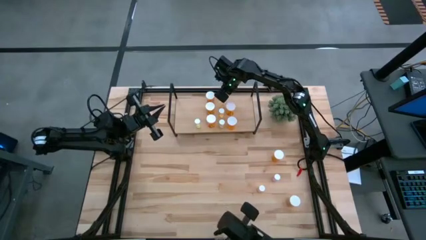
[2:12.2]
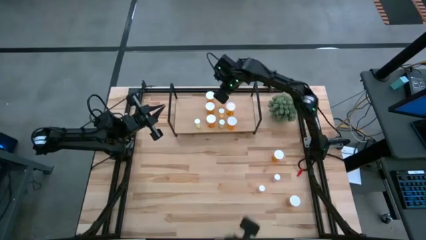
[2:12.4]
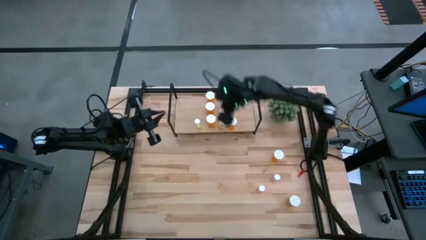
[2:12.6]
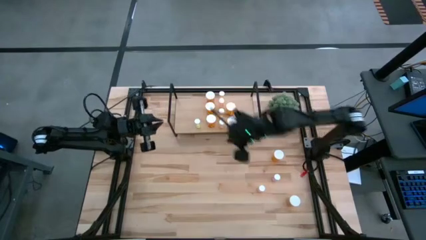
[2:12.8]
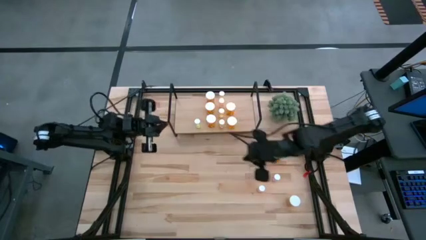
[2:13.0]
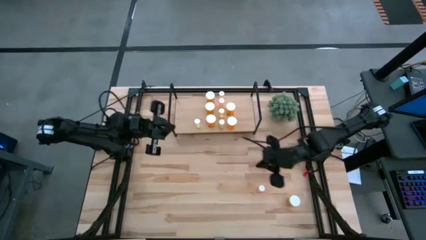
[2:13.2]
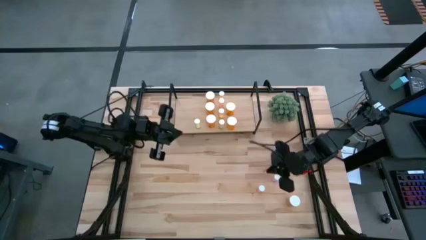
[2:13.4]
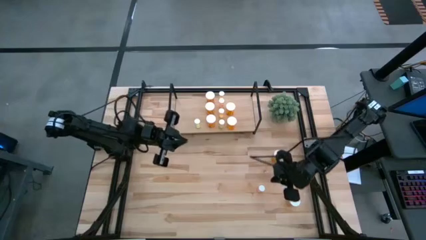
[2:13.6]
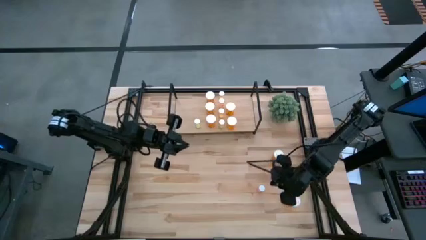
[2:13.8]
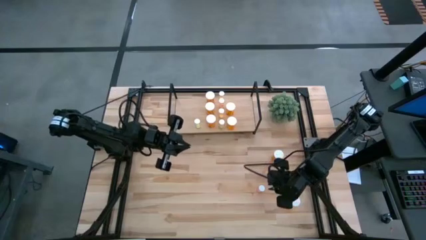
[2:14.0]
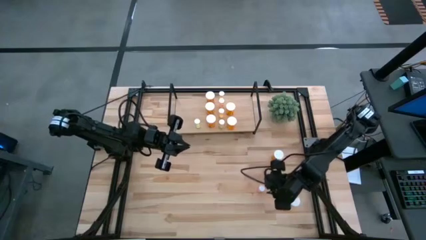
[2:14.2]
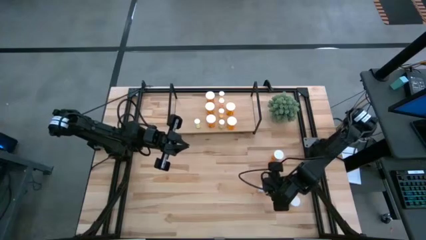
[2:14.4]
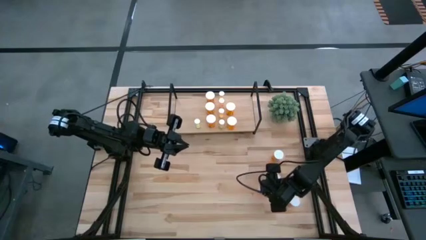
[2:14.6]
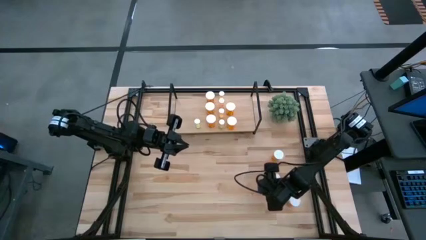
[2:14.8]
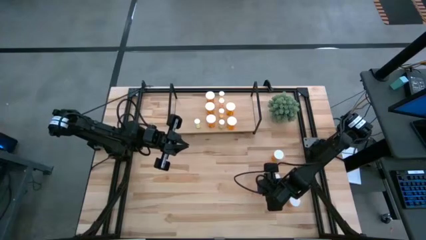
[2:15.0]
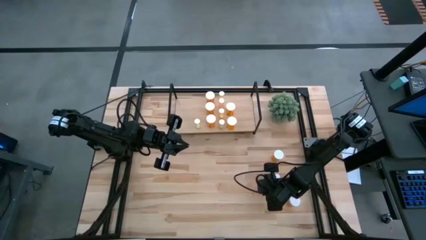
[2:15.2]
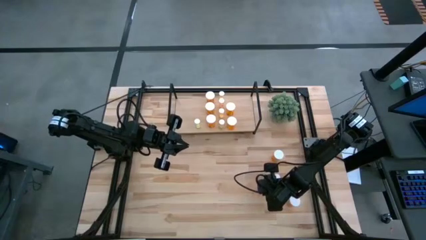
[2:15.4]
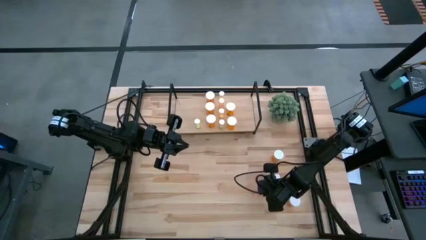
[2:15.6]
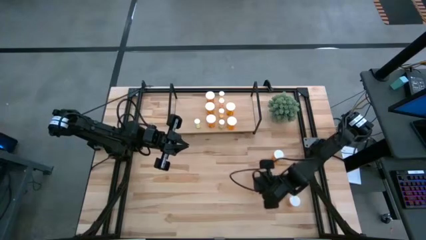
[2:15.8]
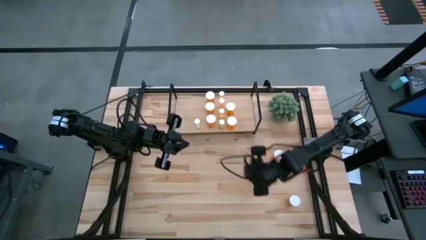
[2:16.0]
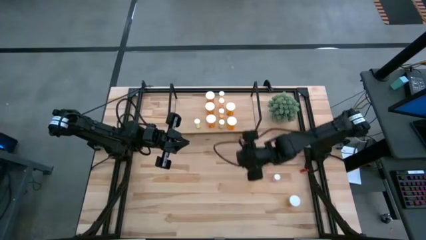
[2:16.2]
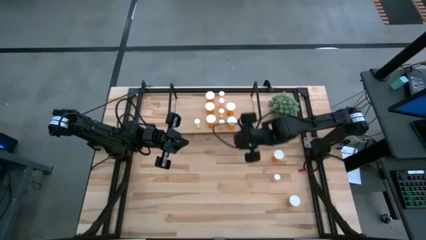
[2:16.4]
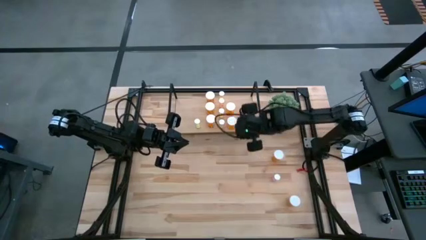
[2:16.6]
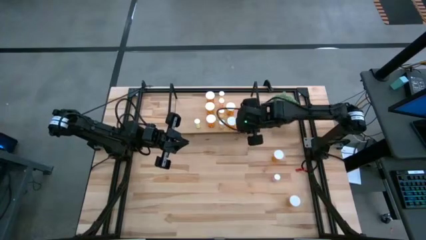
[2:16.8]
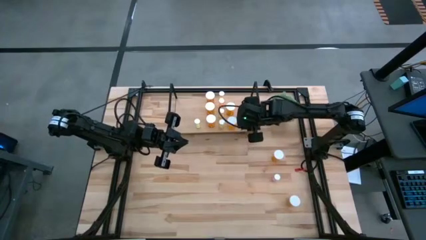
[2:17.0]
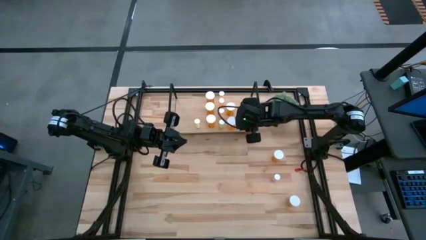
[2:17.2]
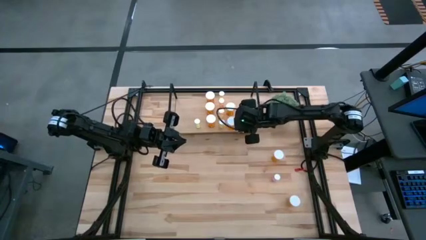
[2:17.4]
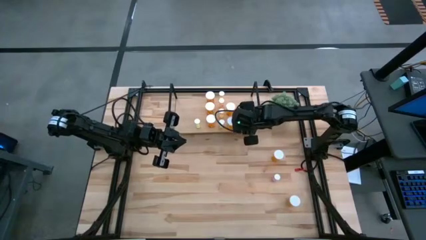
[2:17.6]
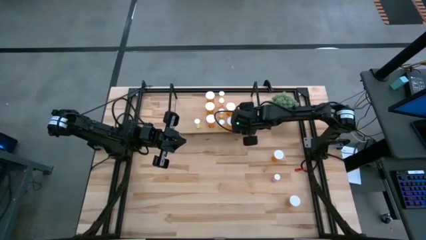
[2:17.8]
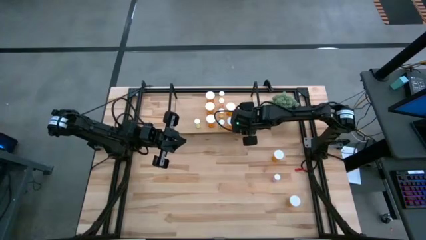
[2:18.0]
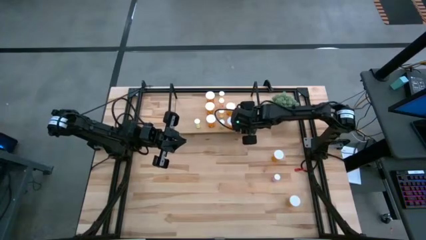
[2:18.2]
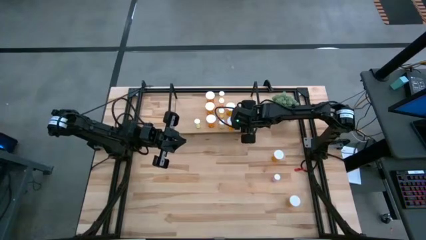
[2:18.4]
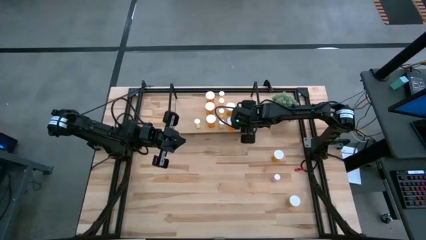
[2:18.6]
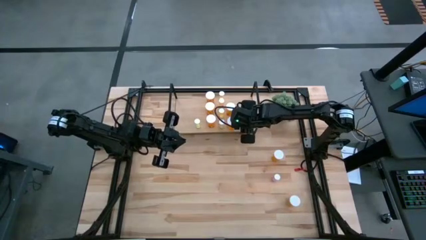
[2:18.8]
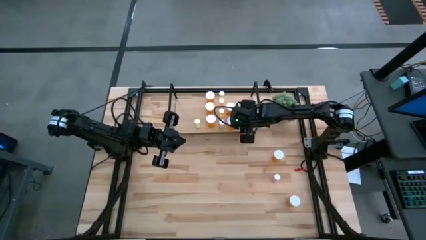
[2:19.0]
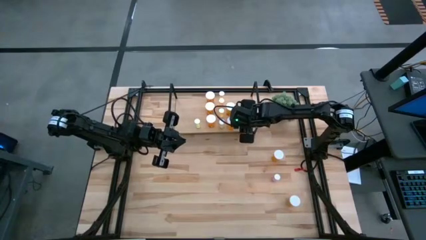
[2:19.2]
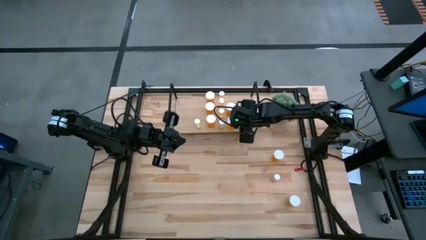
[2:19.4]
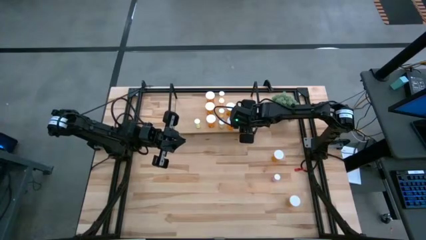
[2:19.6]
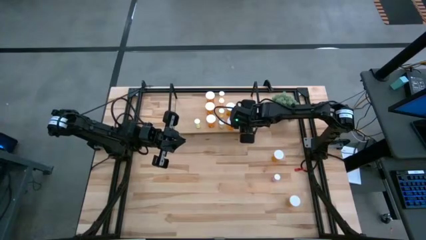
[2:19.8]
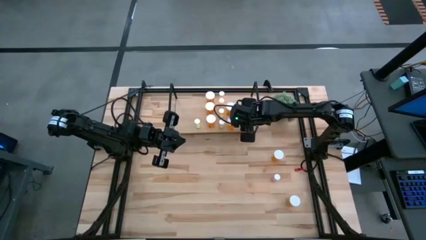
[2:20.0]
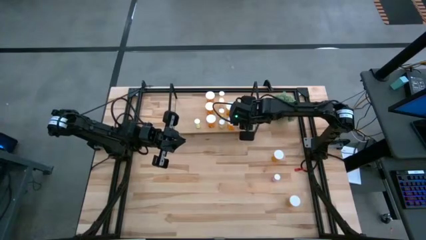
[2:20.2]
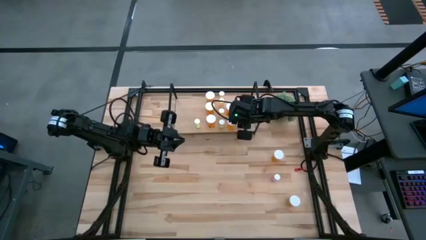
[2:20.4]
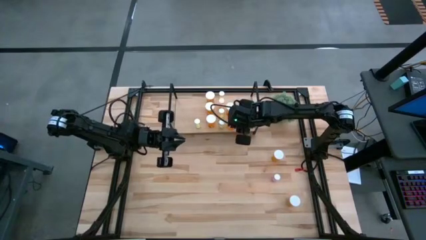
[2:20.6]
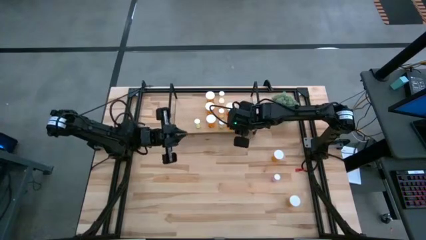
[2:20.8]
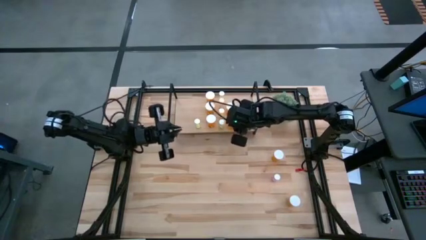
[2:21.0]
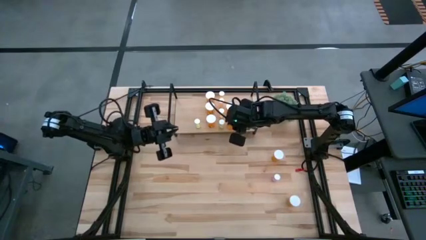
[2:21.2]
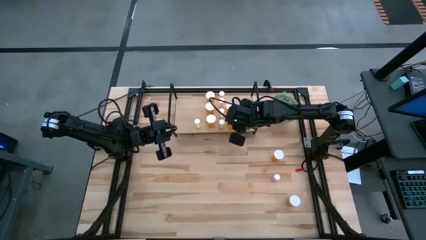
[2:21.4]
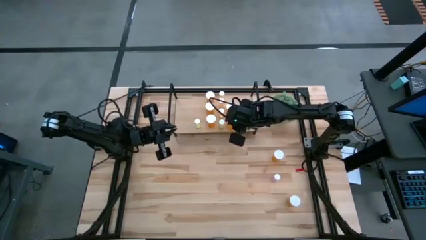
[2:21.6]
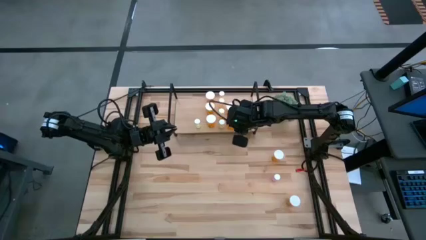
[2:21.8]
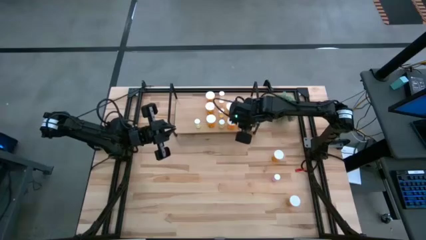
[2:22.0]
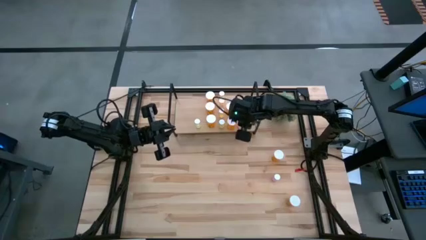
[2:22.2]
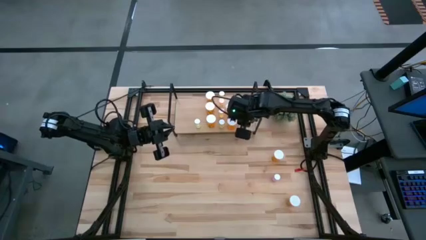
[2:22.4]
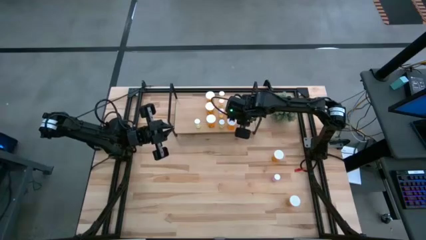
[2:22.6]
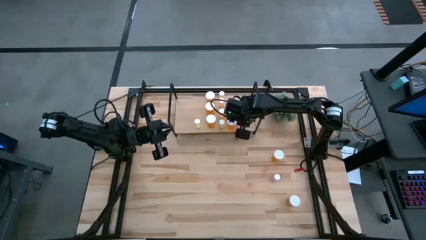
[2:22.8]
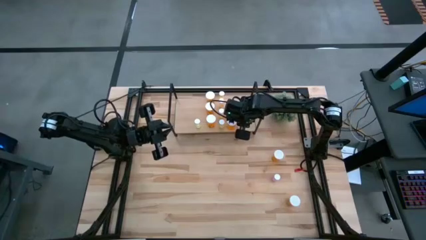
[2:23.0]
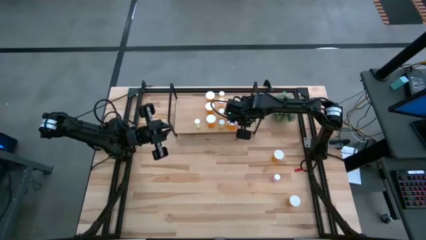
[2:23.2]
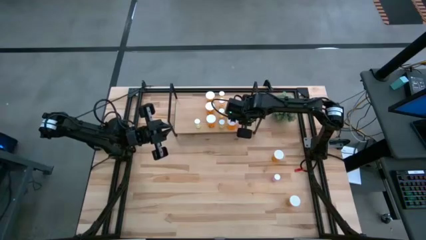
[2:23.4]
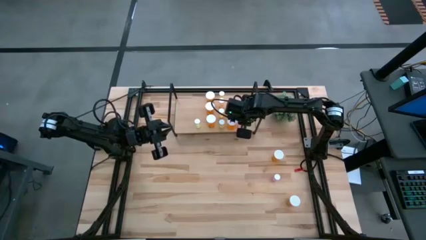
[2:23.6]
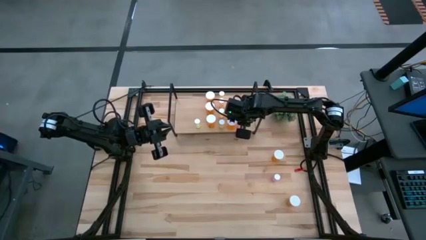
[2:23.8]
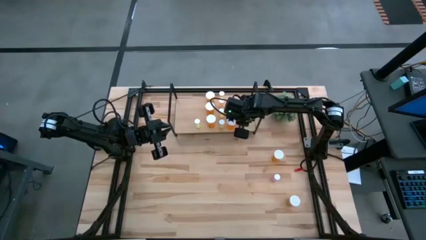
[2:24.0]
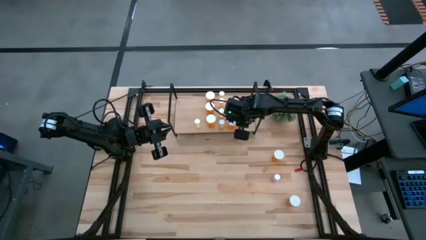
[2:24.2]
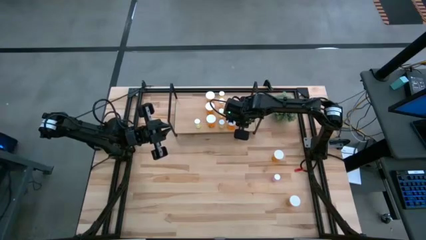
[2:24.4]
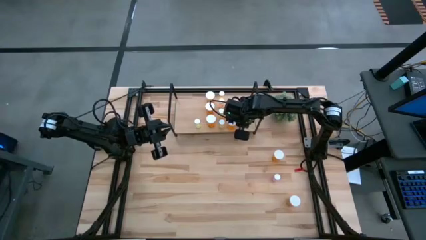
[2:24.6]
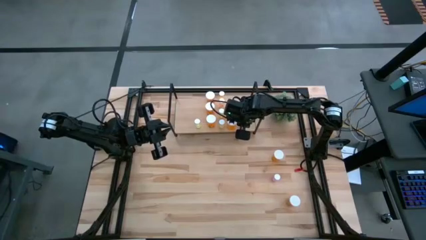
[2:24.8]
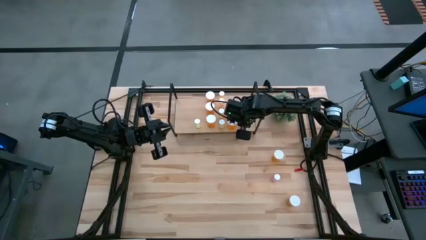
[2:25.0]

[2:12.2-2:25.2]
Task: Pick and place medicine bottles onto shelf by color
Put the small pink pill bottle on the shelf

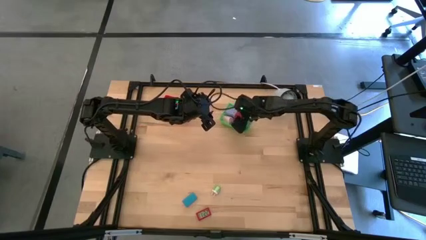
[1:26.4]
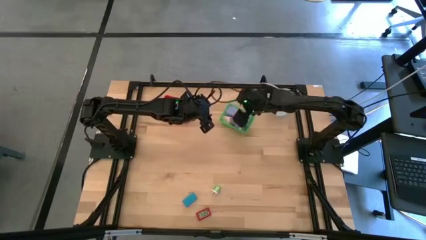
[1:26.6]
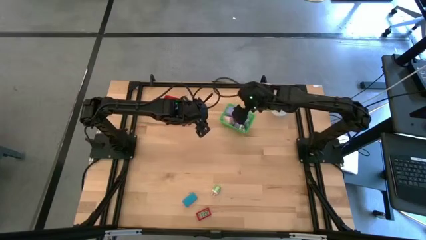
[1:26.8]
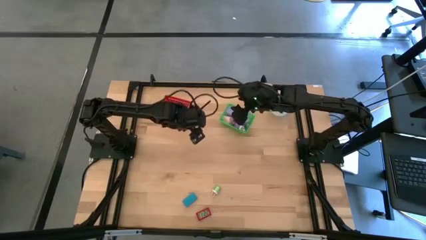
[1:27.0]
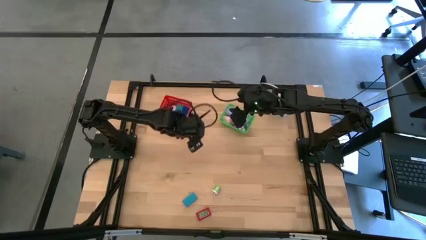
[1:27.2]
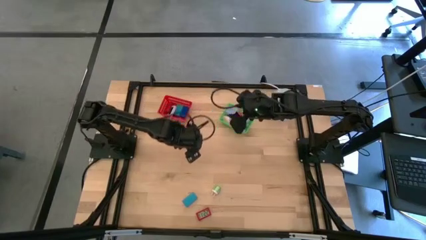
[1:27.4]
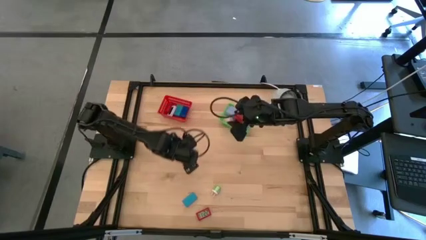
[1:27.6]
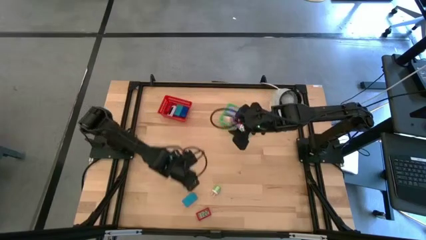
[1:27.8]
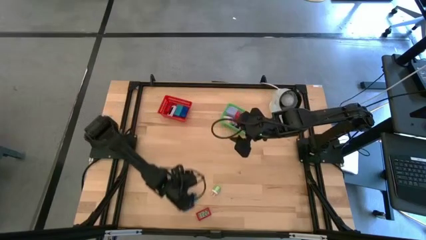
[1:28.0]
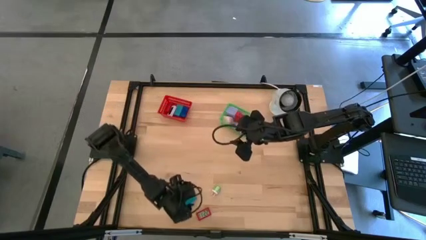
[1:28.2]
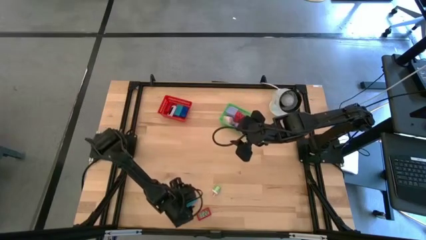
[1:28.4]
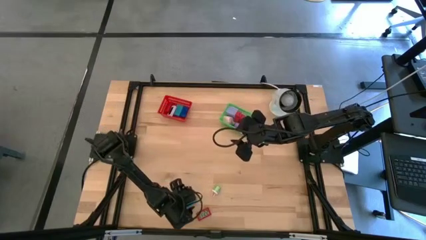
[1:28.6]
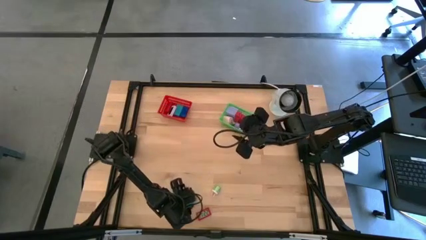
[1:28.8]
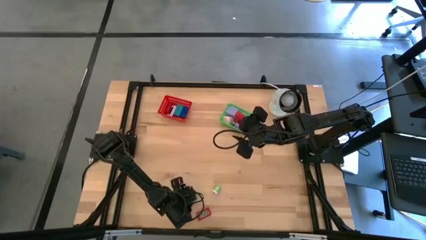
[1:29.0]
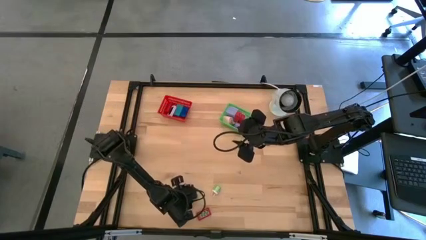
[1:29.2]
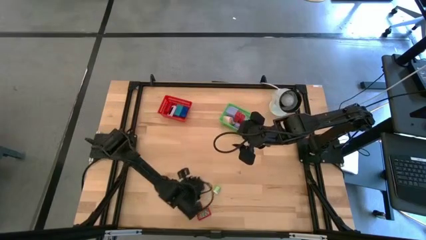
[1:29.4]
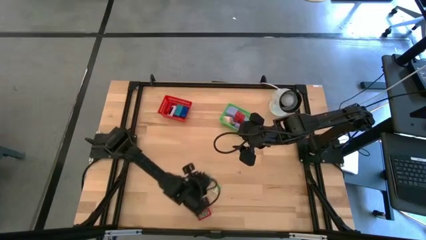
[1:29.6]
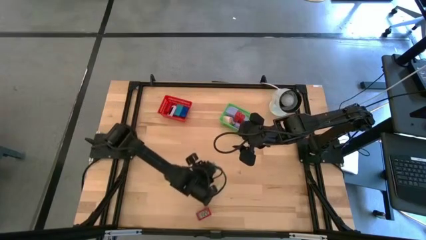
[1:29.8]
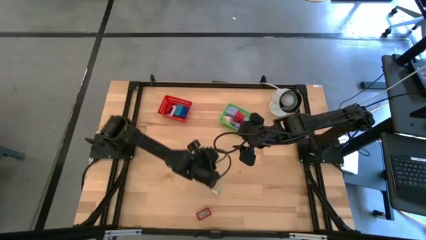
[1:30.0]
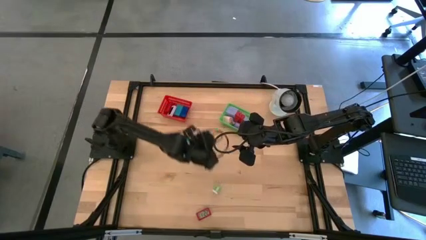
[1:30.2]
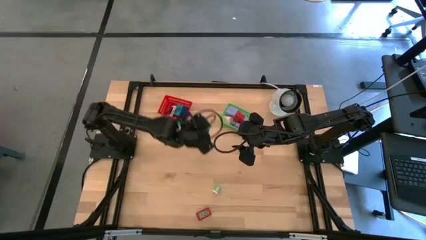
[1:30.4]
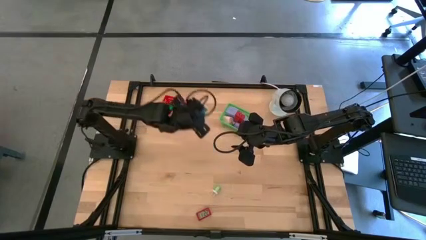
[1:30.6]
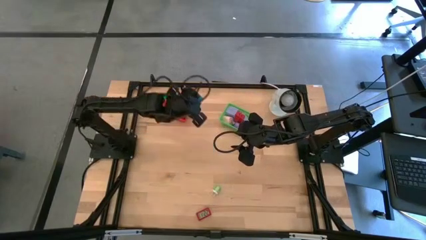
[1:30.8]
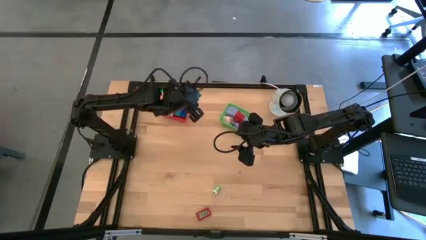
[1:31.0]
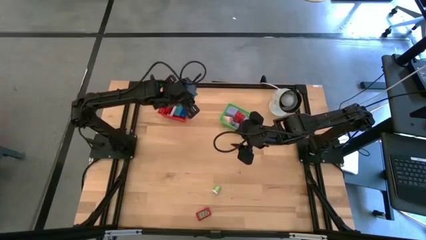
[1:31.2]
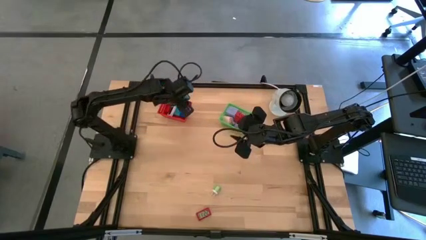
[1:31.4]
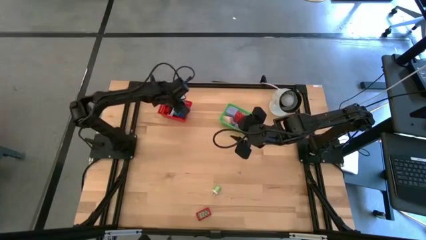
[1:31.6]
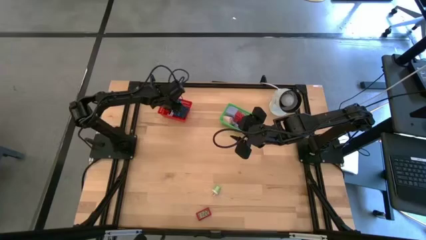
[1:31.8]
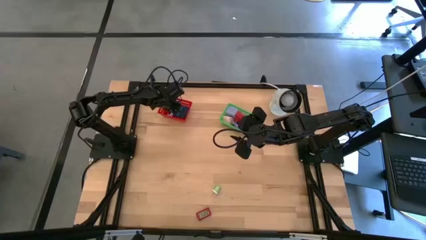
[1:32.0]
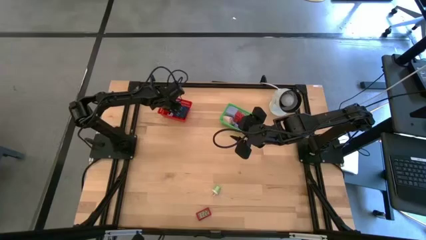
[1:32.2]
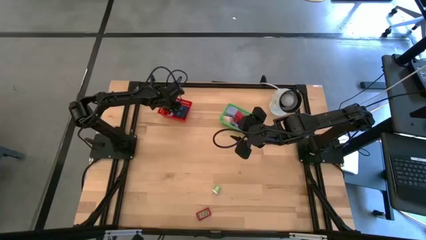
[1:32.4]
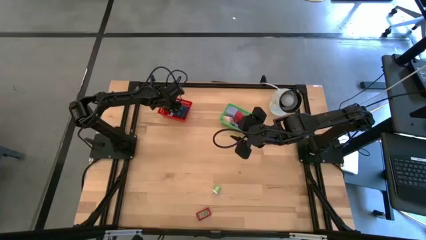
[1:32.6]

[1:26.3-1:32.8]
Task: Pick & Place Office items
Put the light blue digital clock into the red bin
